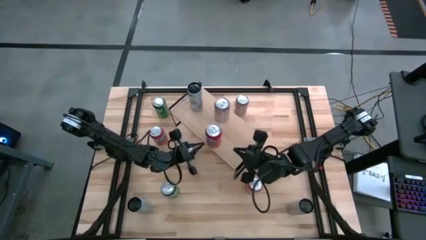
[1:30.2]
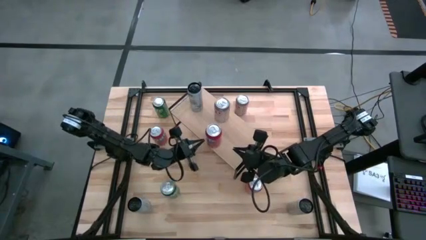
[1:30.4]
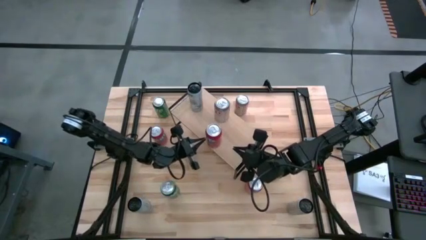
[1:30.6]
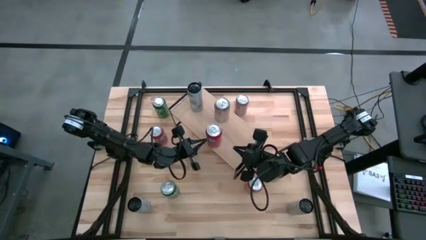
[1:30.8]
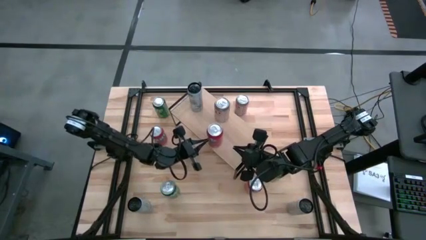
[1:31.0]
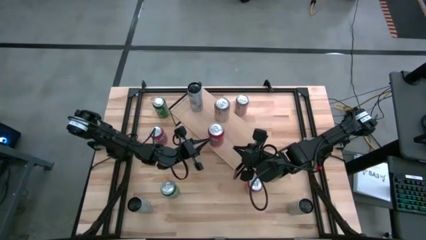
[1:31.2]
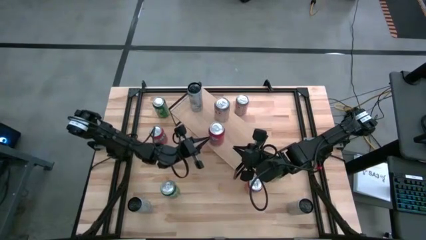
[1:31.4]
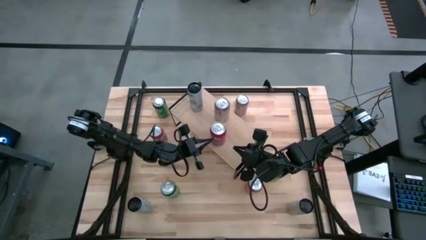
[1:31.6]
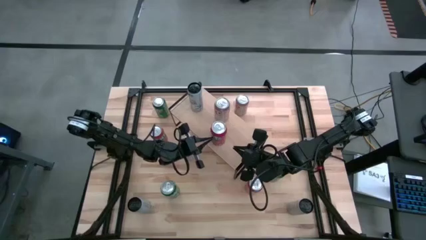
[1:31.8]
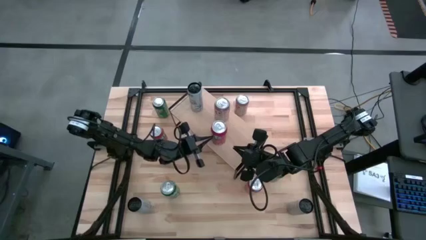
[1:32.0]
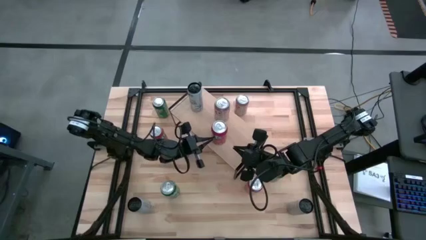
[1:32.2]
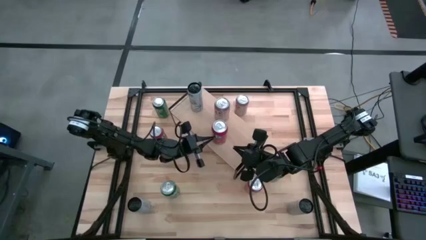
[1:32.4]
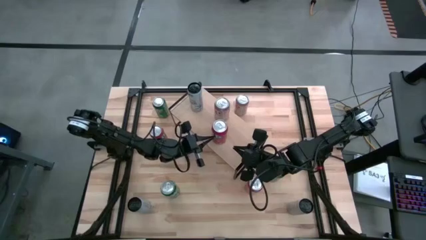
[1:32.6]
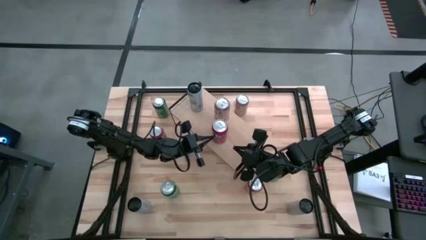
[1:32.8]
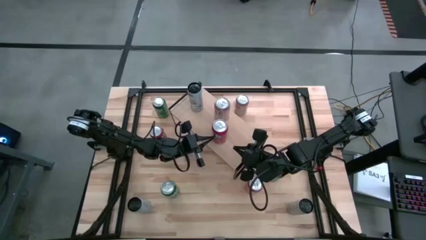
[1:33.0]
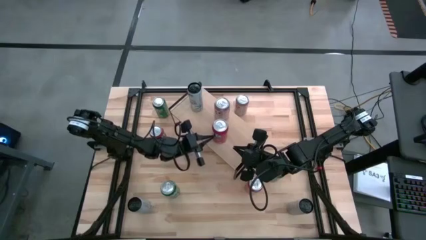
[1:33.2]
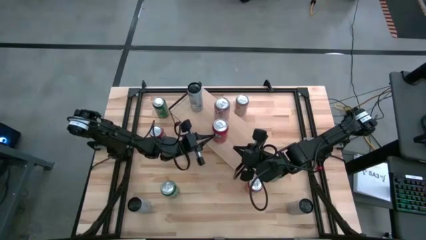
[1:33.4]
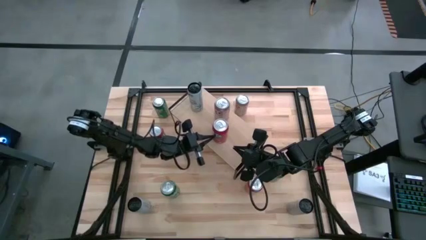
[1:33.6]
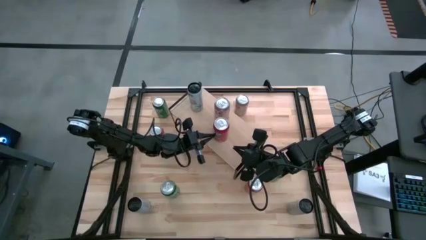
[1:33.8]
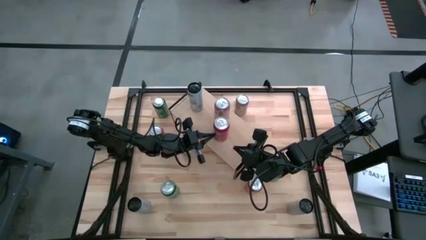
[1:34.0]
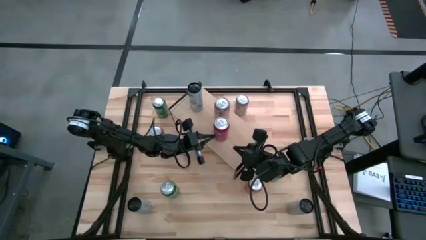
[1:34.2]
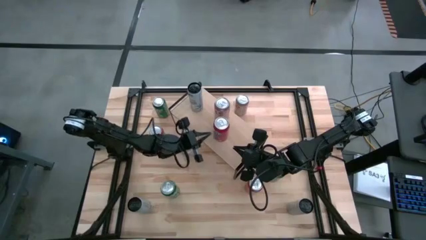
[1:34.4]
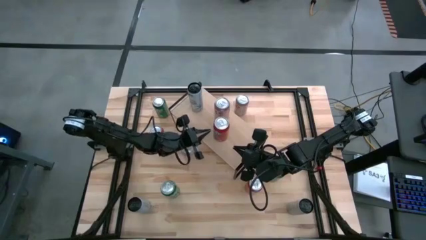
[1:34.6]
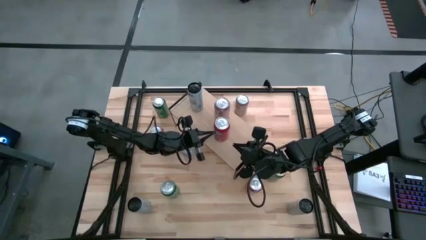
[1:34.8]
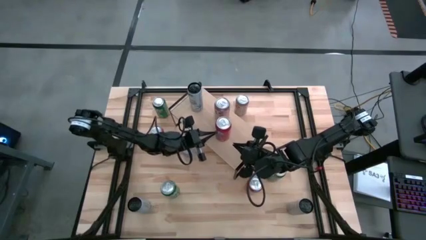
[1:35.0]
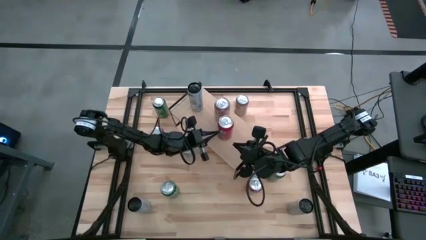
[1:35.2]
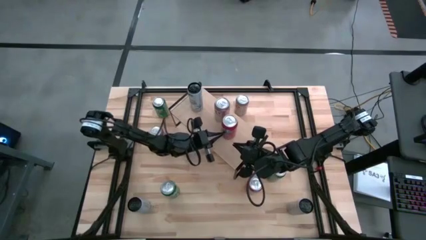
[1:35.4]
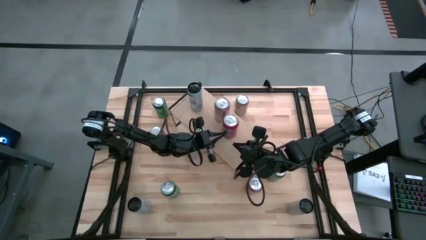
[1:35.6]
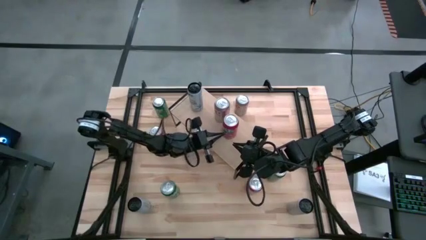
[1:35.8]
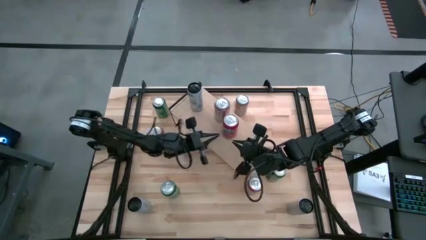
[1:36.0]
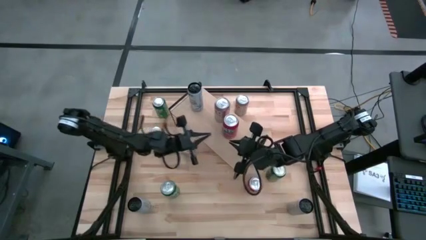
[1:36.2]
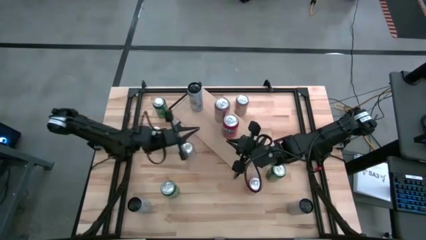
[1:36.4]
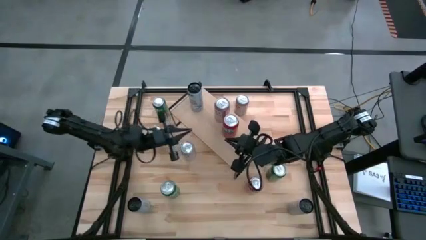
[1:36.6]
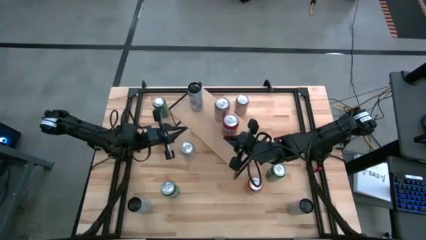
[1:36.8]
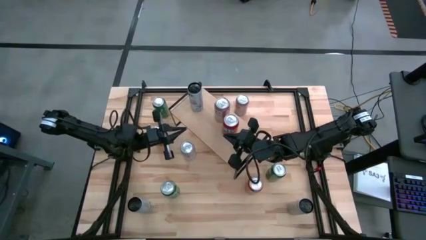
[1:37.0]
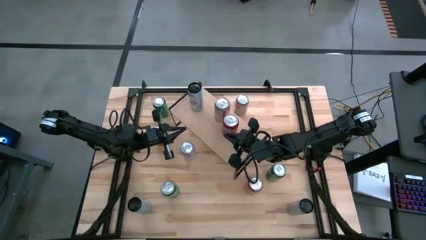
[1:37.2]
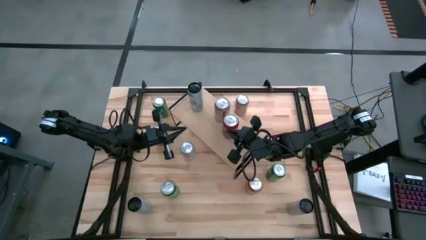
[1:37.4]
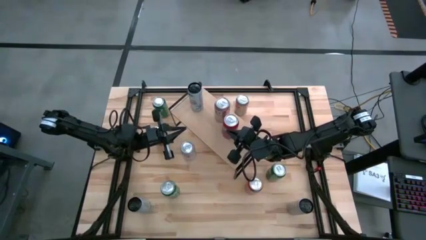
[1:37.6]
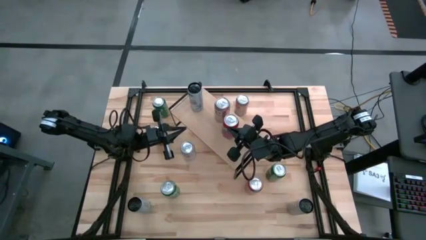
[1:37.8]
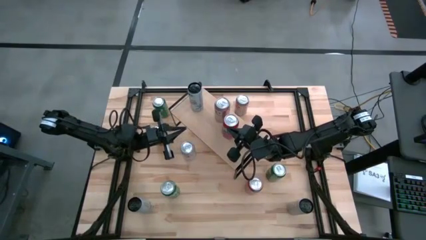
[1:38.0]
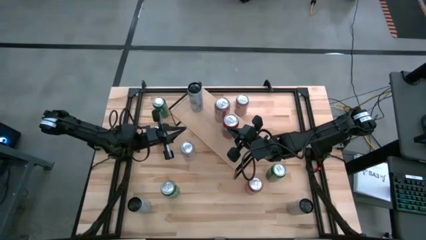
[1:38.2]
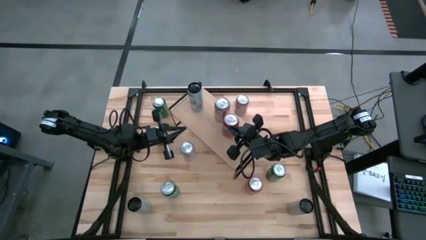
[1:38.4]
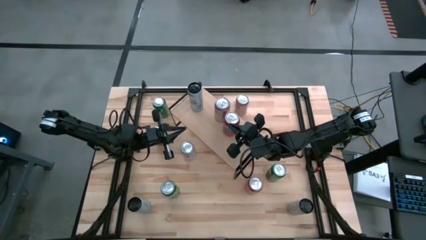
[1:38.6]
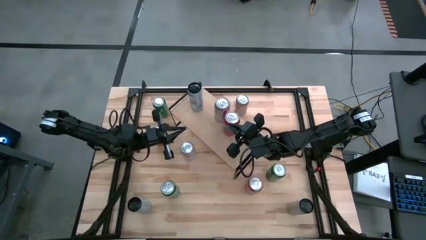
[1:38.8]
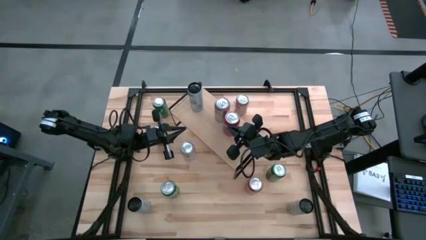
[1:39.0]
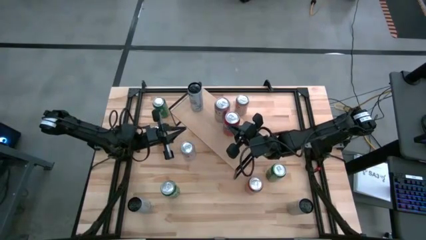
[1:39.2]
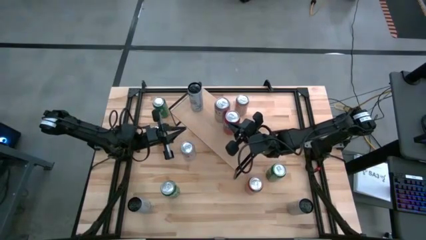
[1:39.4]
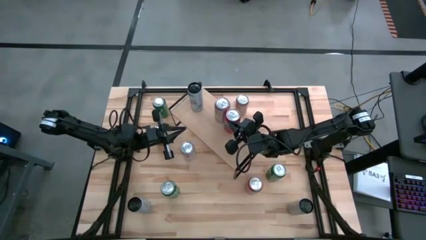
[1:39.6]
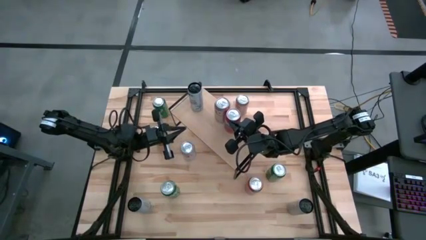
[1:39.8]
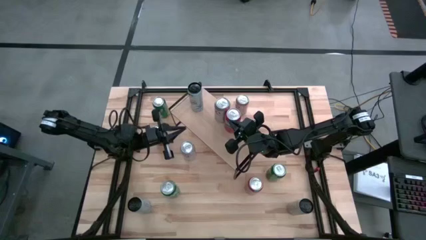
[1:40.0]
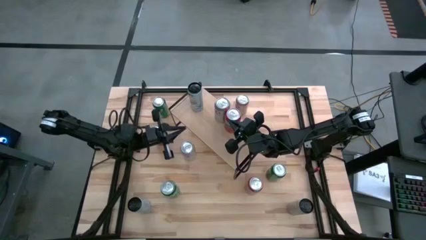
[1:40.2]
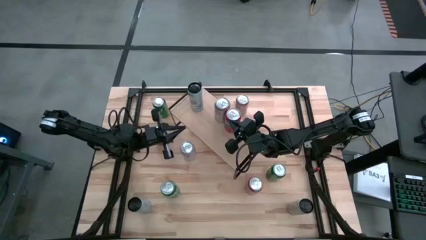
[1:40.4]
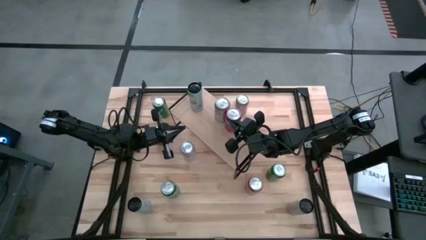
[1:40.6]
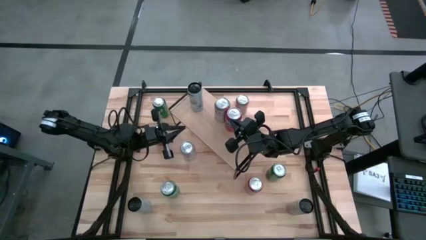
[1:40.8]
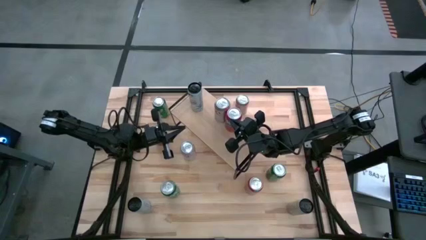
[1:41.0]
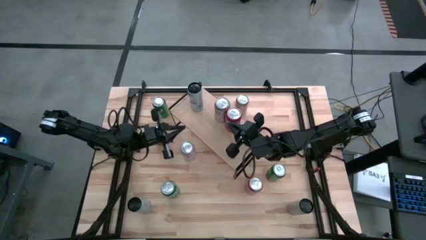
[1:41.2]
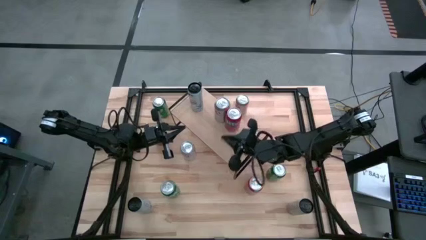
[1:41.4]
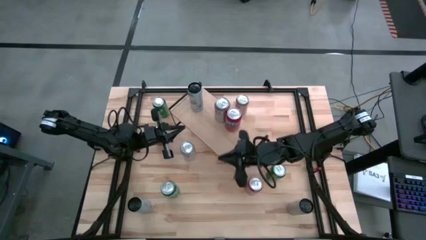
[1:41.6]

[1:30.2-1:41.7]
Task: Place canned beverage on shelf
Put the bottom orange soda can on the shelf

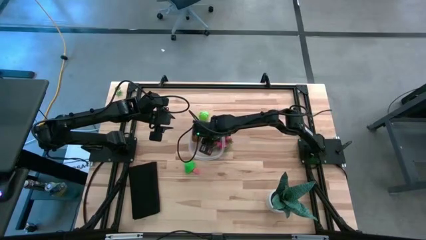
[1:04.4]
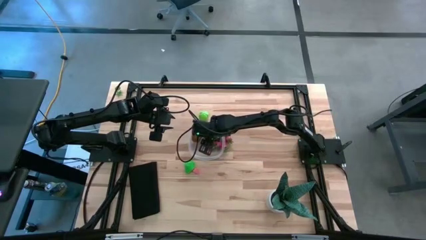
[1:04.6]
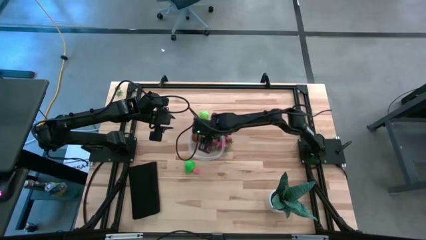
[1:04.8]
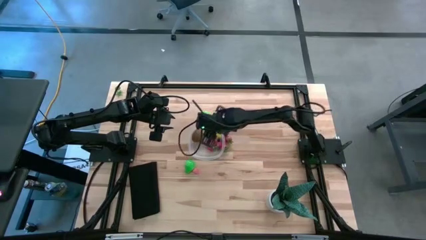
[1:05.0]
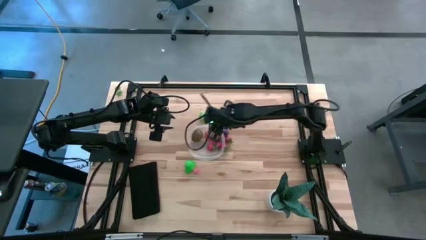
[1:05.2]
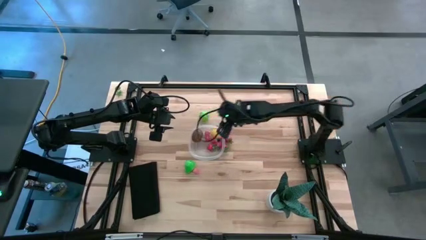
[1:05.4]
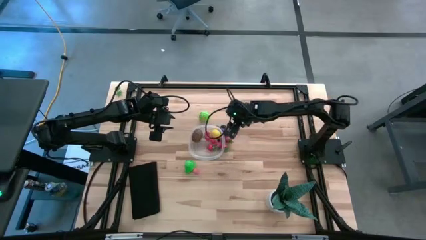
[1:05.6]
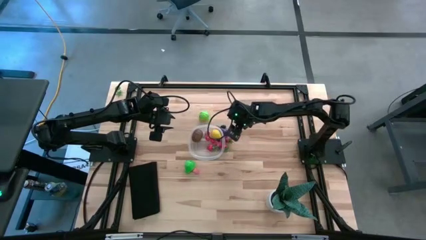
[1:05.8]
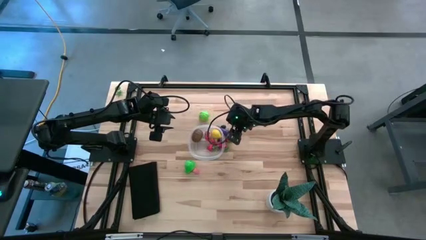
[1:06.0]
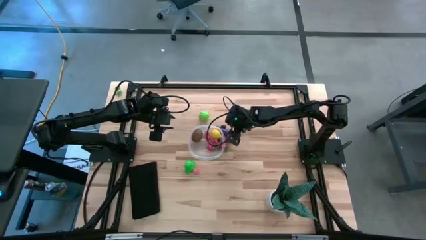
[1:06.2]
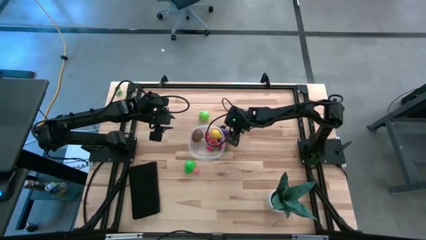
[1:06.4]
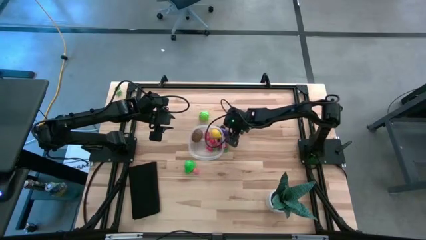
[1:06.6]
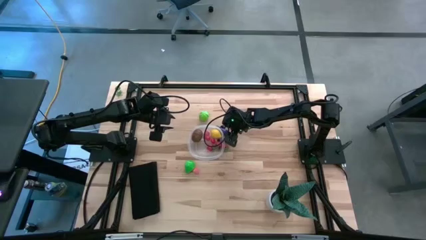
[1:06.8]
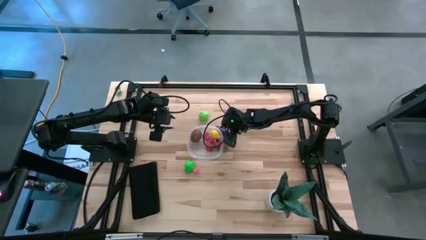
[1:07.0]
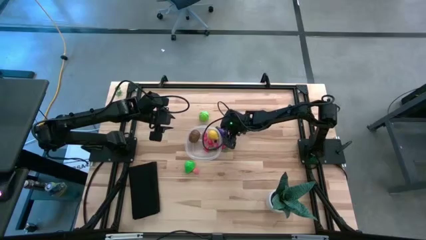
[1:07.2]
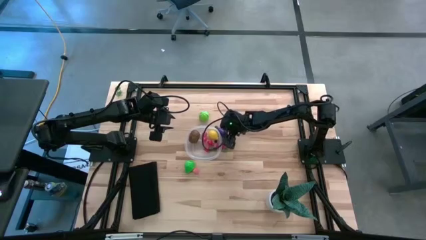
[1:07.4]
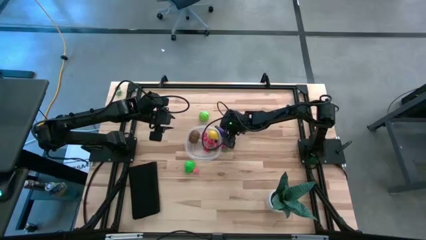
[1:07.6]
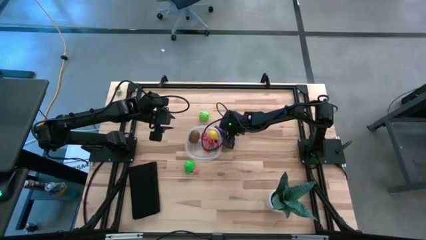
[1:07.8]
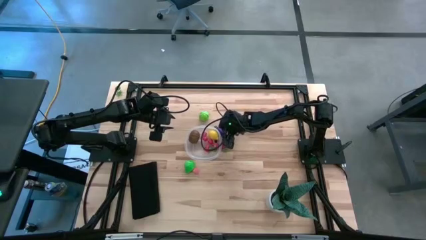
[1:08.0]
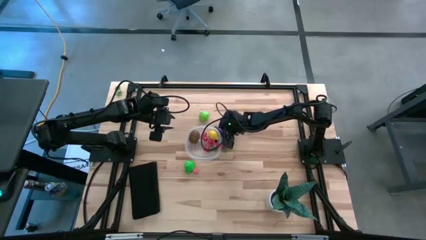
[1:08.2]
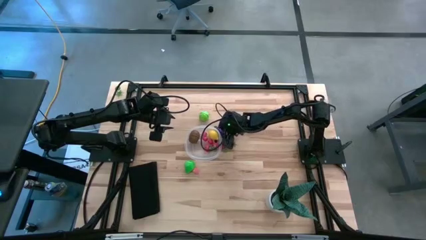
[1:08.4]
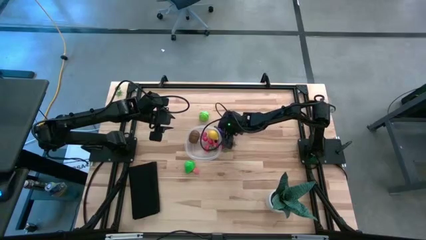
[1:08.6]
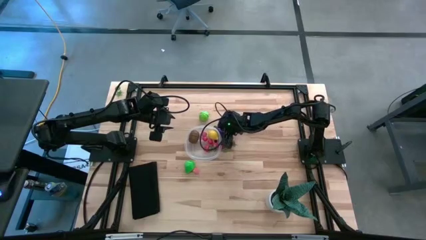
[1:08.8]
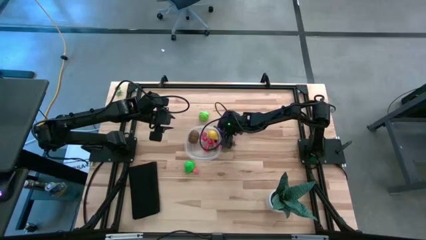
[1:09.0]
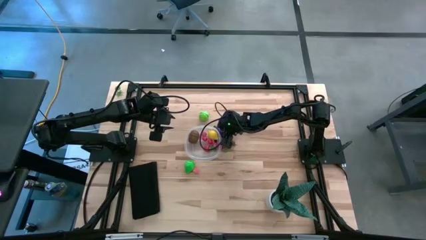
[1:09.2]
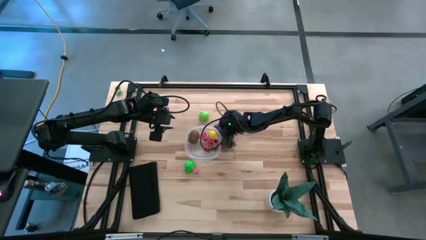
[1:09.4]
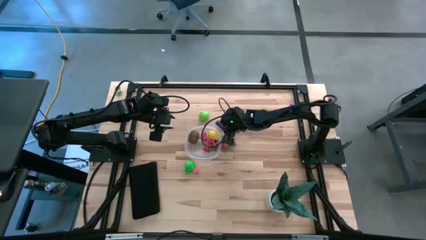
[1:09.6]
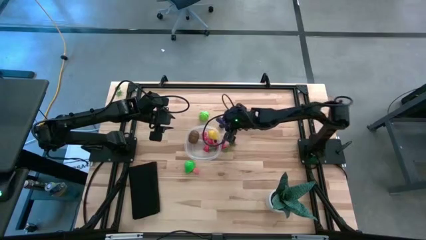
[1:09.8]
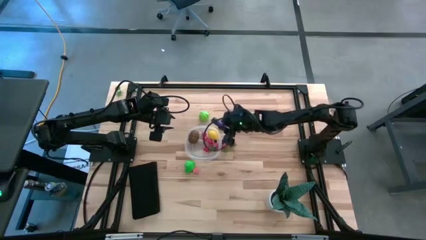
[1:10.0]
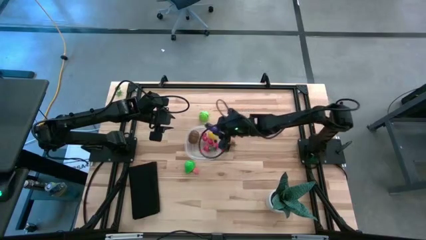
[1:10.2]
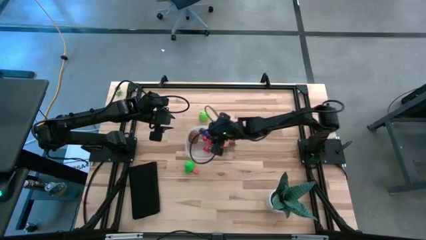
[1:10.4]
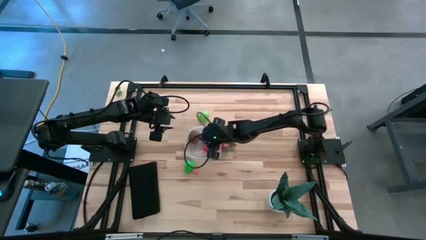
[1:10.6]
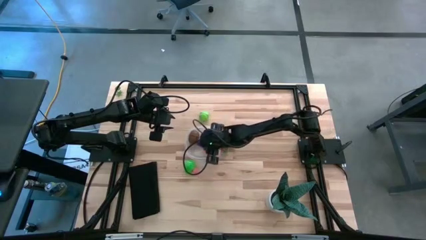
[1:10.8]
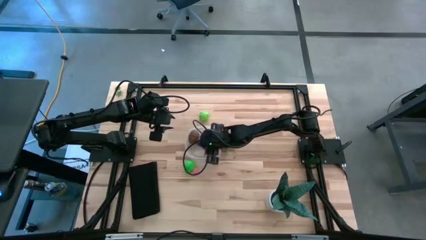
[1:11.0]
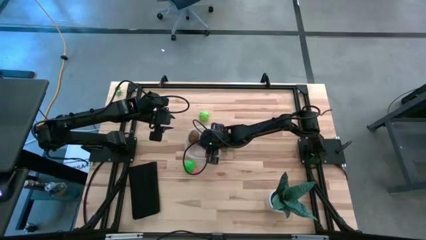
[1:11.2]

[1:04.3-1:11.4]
Task: Pick and placing Produce into tupperware
Put the eggplant into the transparent bin
